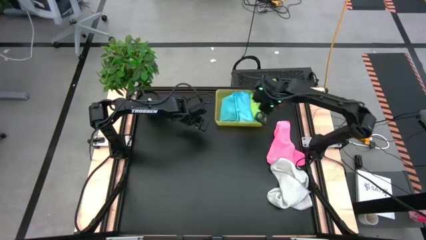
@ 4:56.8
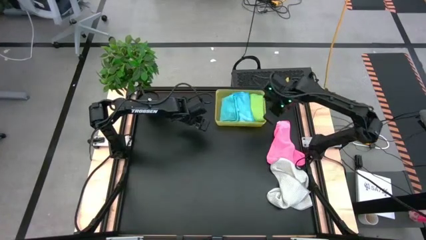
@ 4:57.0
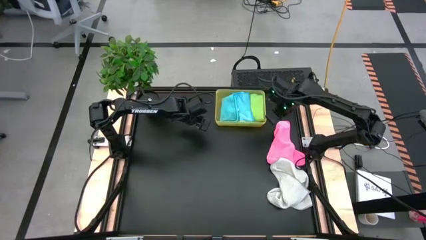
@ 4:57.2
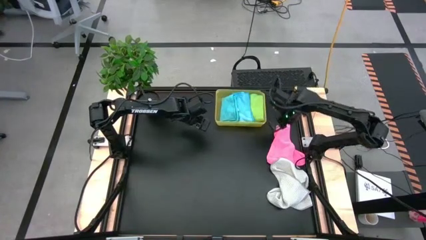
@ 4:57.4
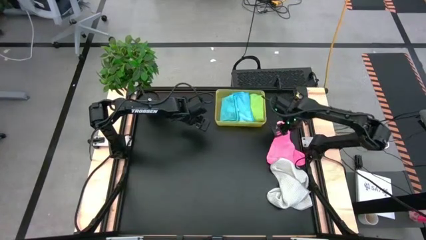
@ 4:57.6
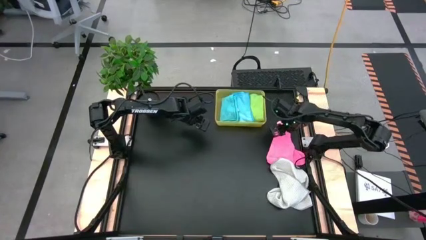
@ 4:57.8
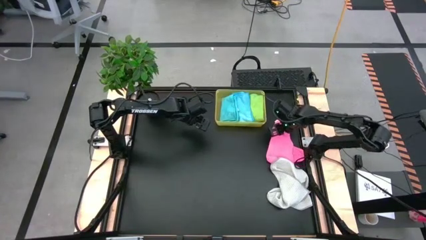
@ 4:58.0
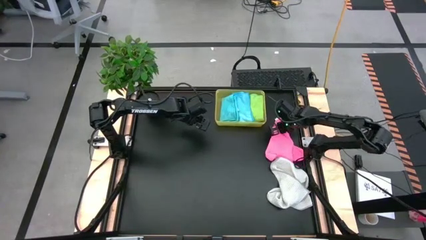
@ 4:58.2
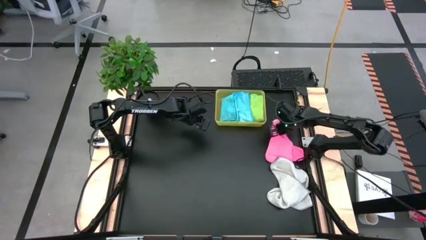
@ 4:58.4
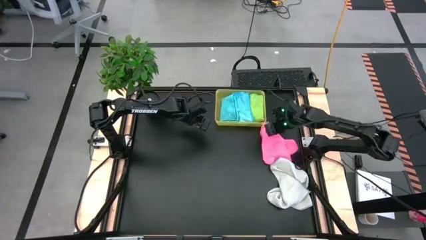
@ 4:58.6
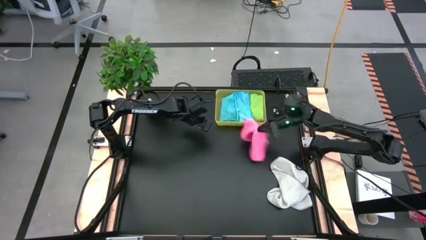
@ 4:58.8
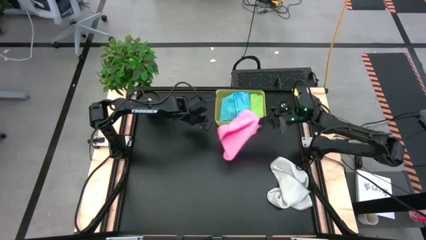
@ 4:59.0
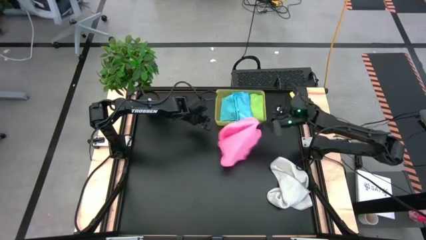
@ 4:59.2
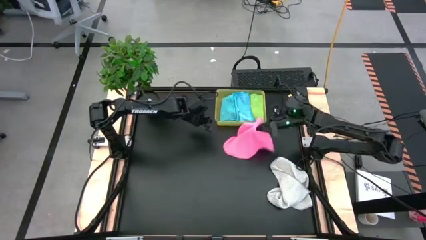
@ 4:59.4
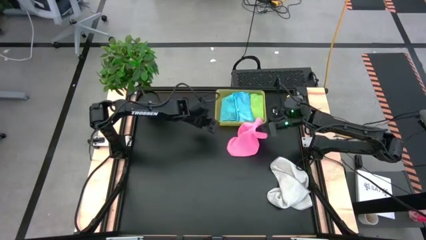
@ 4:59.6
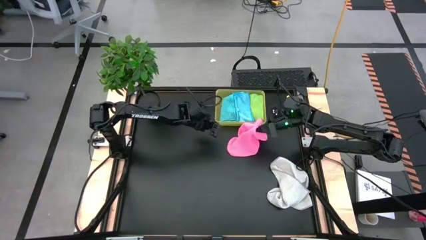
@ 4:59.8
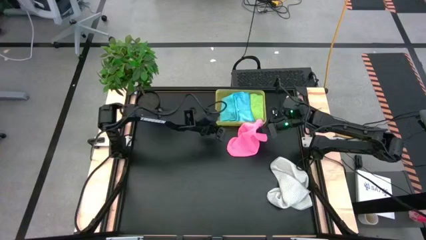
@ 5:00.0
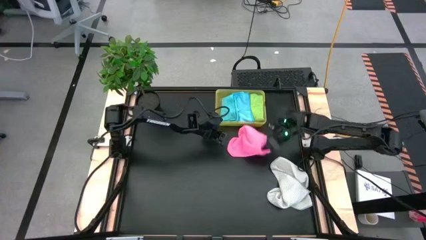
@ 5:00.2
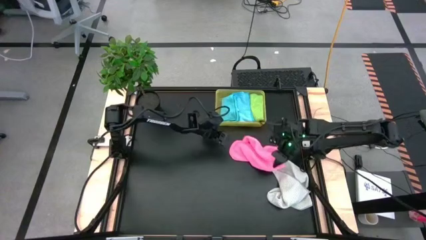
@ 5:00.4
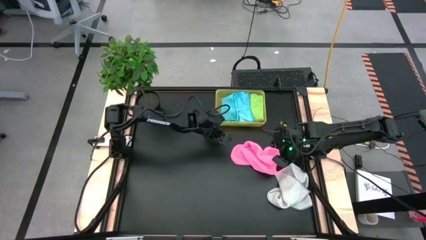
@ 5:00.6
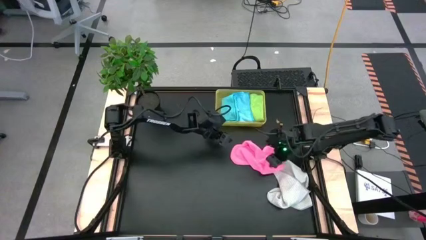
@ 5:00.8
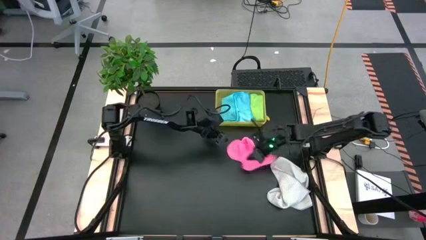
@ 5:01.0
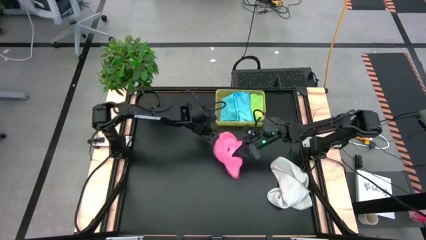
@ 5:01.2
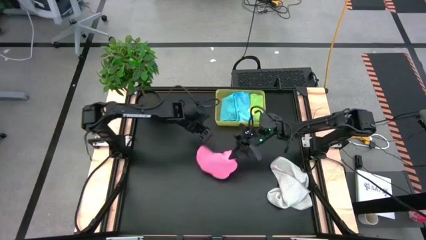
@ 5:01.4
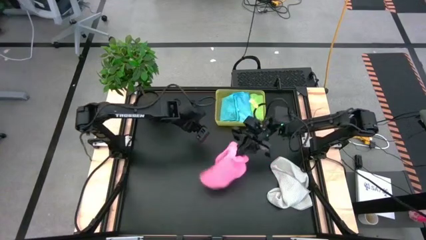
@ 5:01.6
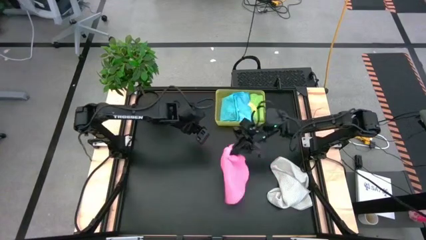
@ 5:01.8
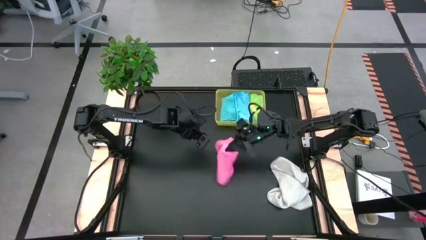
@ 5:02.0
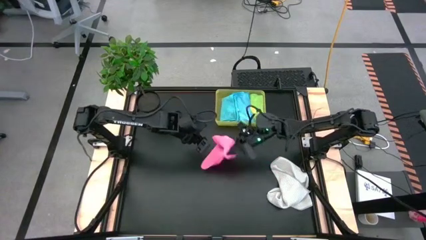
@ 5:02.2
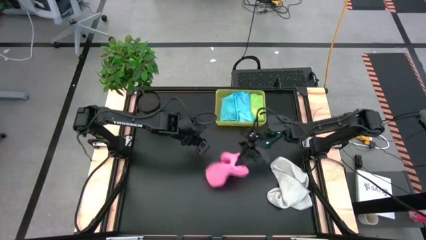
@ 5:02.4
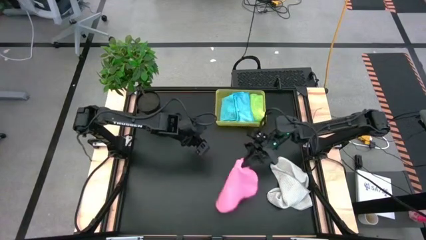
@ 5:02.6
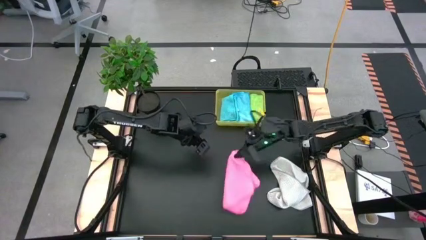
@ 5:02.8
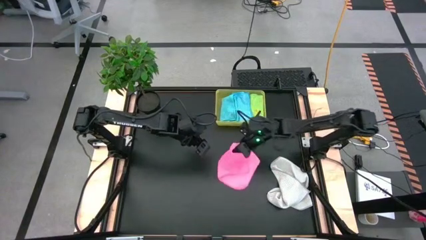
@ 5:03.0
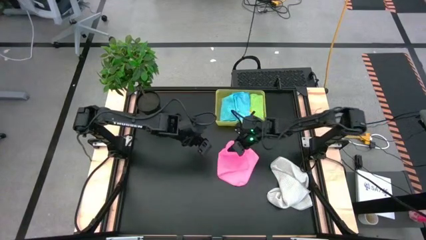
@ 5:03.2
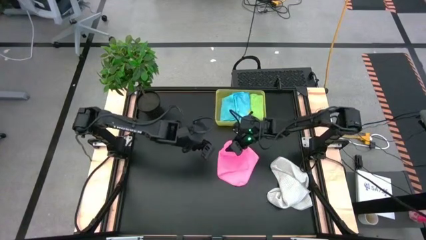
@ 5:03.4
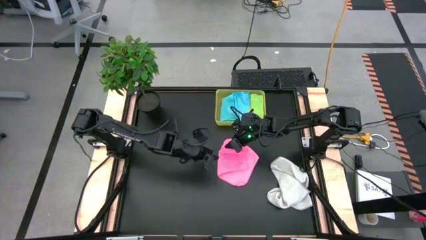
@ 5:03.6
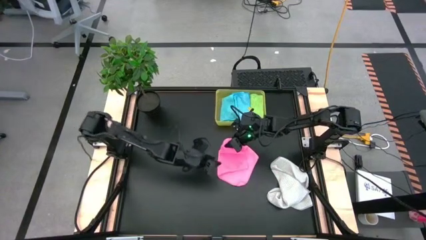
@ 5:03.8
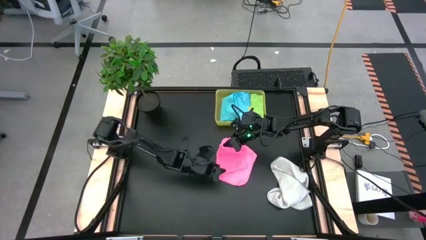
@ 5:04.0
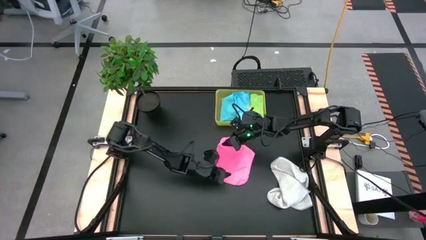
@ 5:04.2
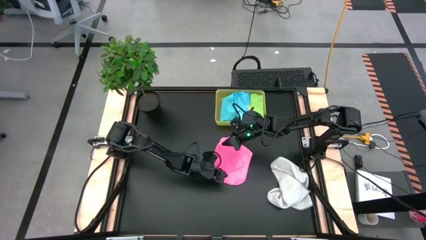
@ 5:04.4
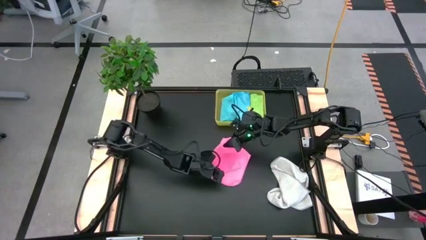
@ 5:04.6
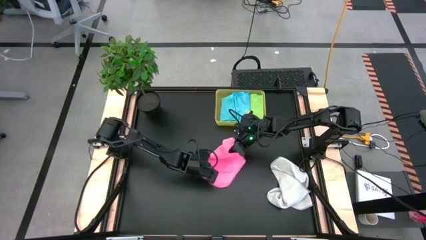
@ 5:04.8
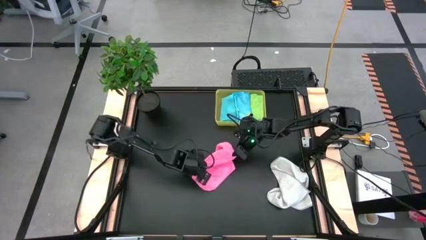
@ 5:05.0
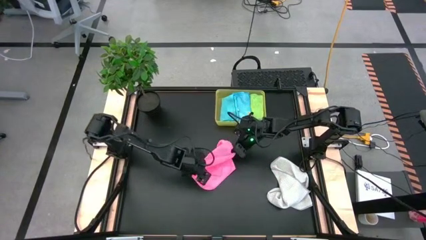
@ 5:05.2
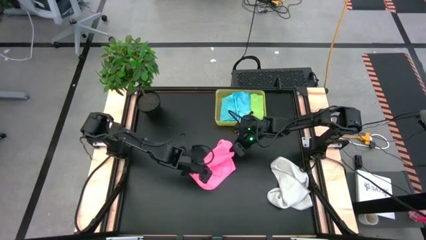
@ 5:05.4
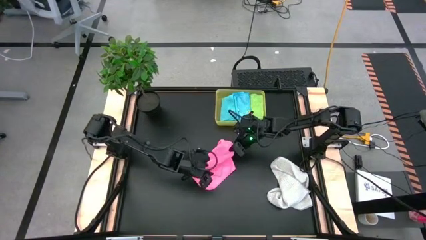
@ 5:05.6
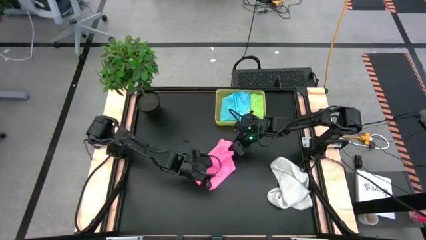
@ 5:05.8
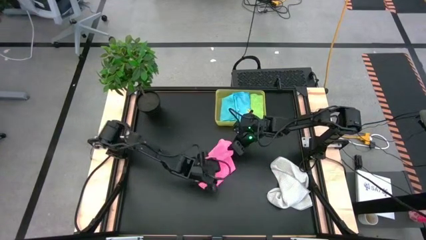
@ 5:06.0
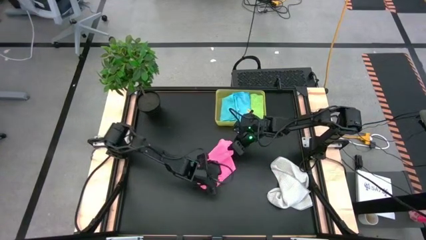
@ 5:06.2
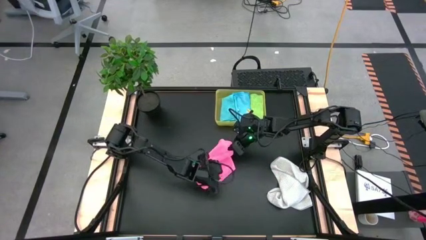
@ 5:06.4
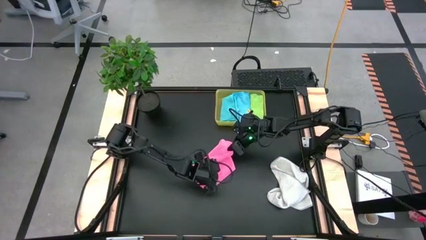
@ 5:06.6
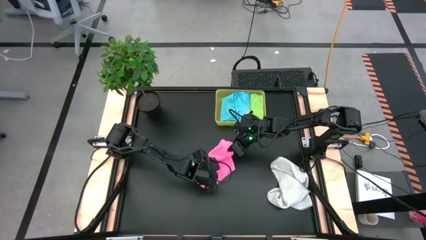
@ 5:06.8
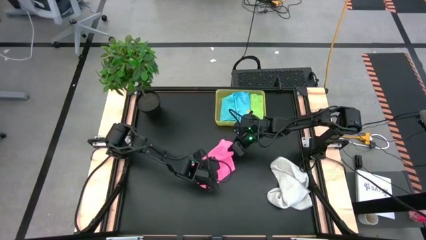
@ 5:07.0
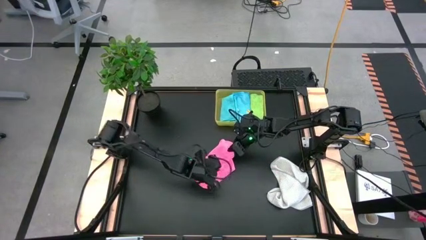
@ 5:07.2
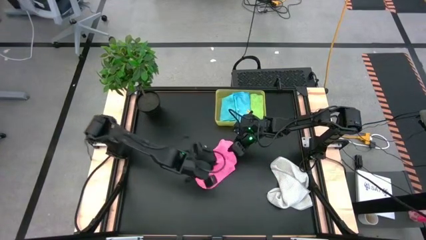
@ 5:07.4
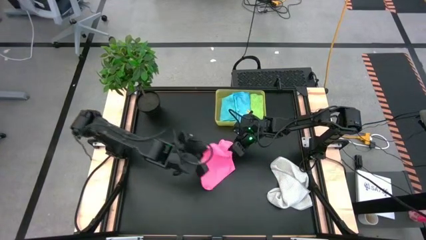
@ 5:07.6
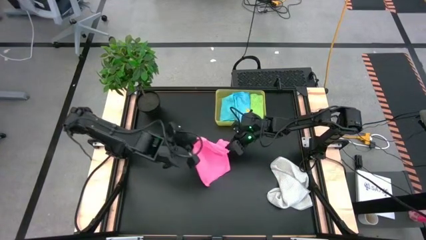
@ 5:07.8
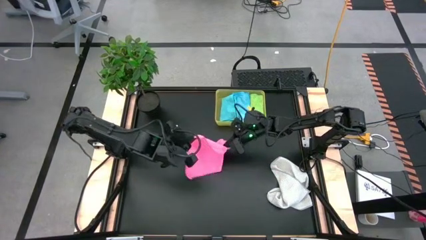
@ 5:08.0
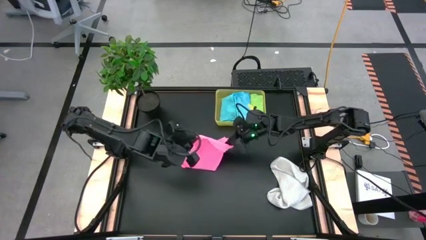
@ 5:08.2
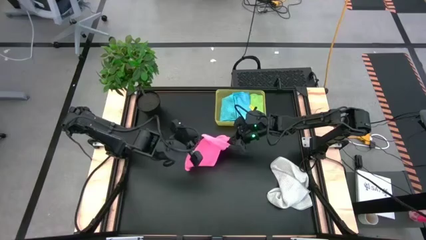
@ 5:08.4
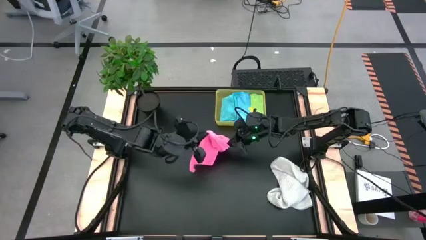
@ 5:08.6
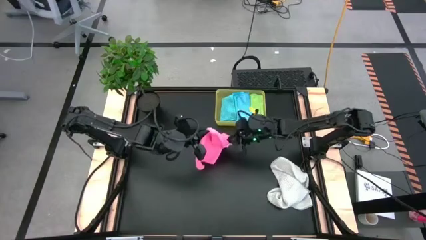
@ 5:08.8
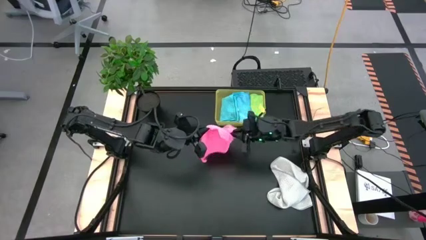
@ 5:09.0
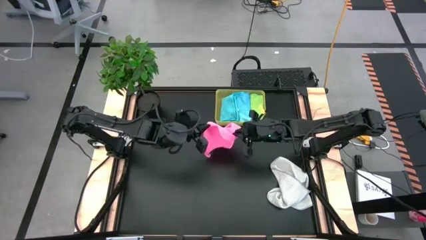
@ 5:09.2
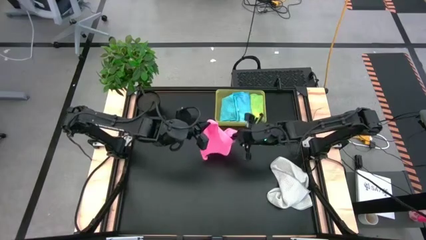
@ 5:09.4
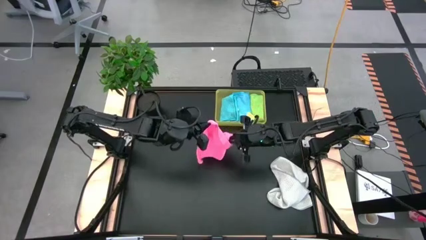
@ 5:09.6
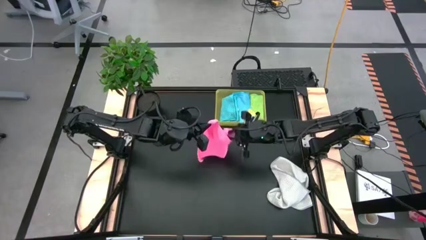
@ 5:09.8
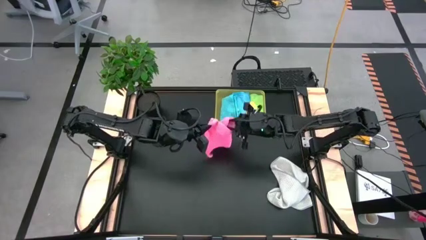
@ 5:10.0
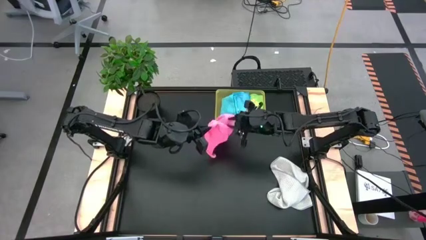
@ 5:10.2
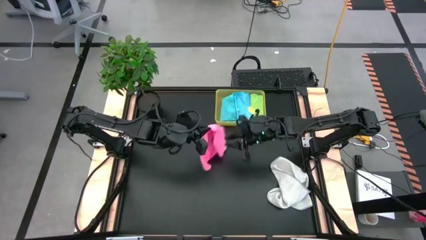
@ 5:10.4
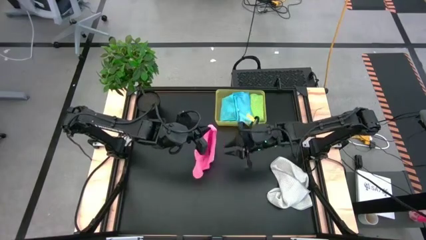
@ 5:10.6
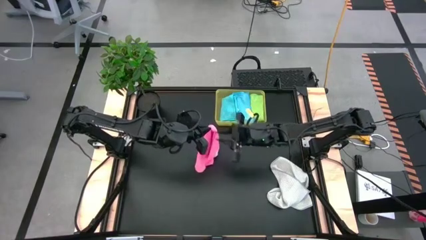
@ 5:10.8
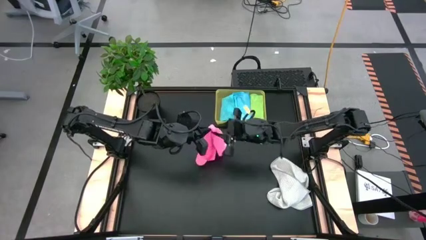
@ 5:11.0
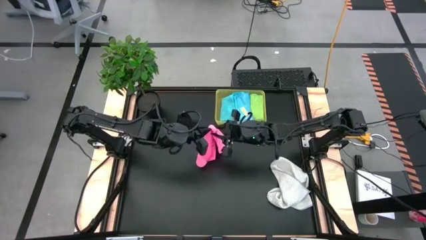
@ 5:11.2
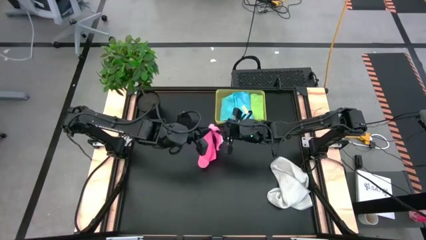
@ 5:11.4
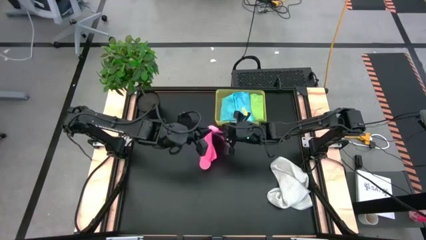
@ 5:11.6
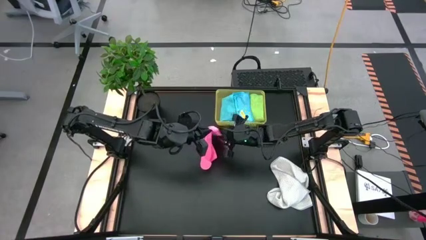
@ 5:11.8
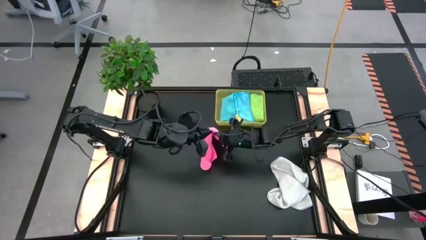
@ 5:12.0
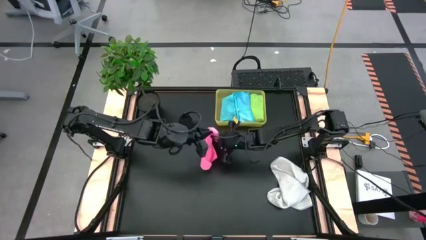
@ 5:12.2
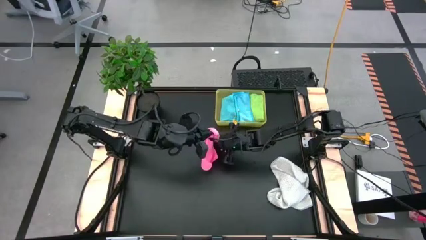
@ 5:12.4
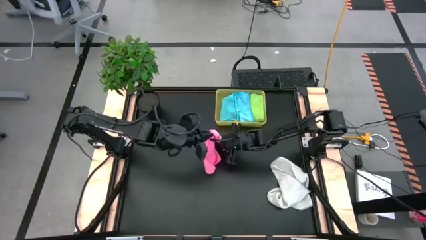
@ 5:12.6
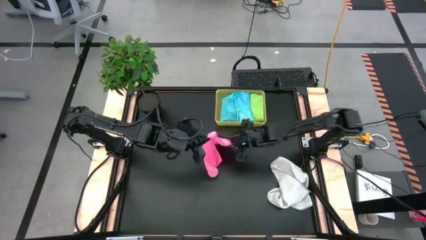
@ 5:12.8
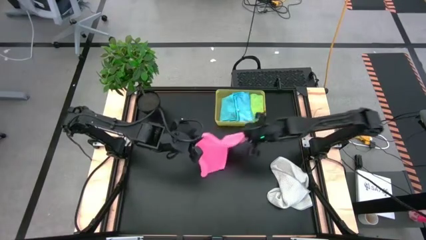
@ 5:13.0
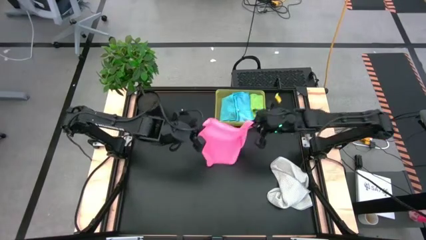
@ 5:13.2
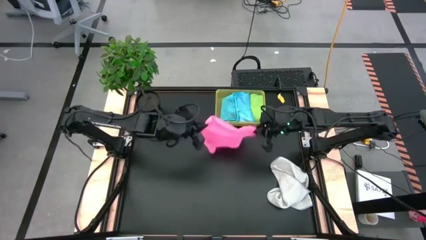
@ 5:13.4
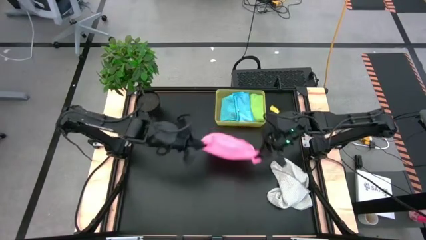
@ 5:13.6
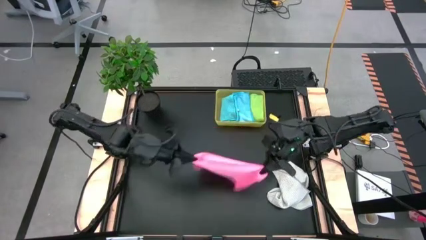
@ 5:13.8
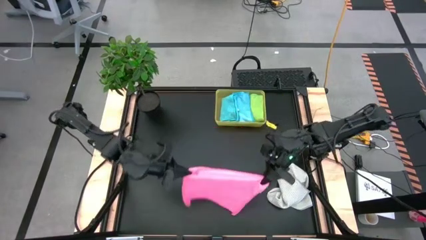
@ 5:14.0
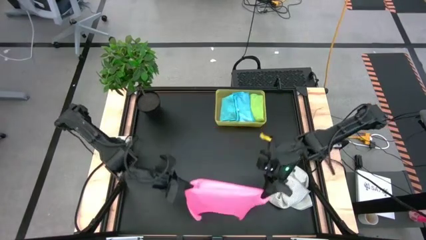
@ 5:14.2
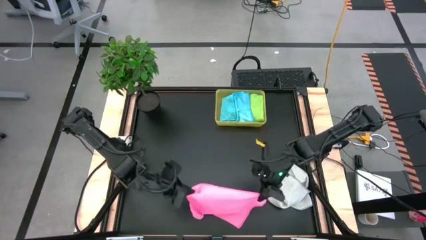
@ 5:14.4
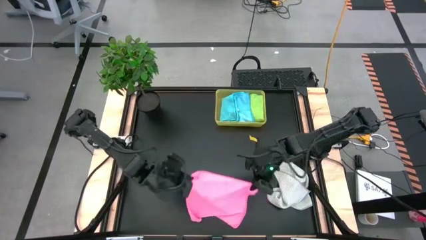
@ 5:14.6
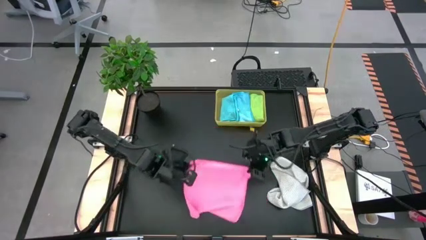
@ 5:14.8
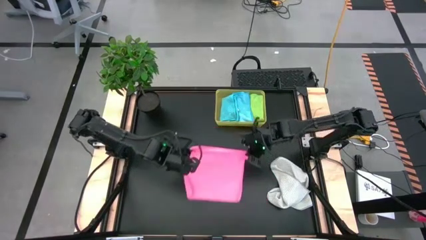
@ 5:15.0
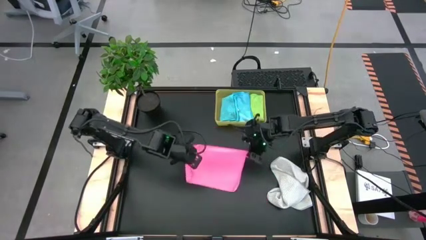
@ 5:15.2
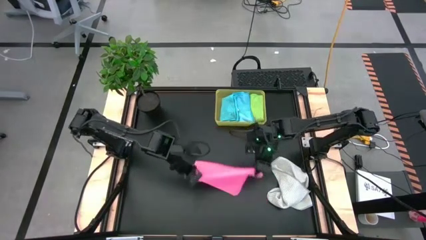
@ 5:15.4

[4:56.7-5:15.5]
Task: Fold microfiber towels
Fold the pink microfiber cloth
